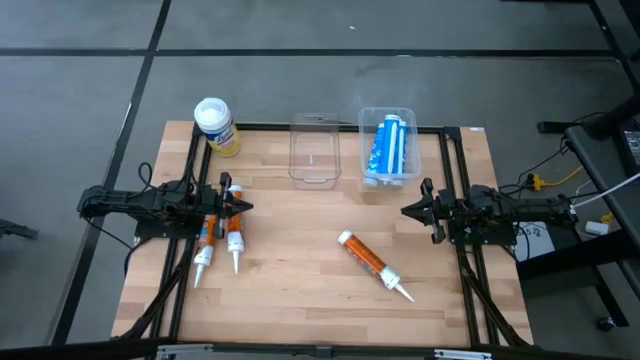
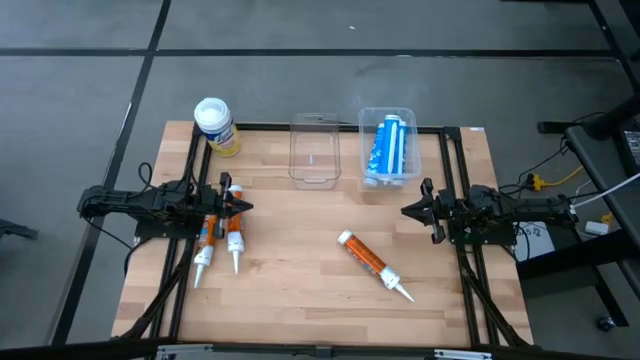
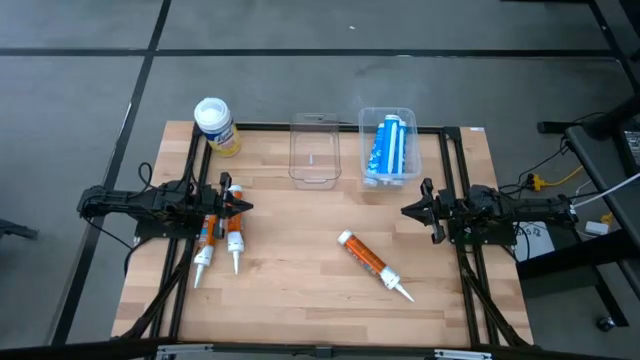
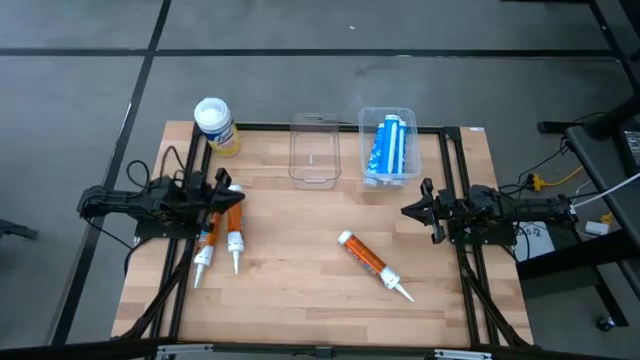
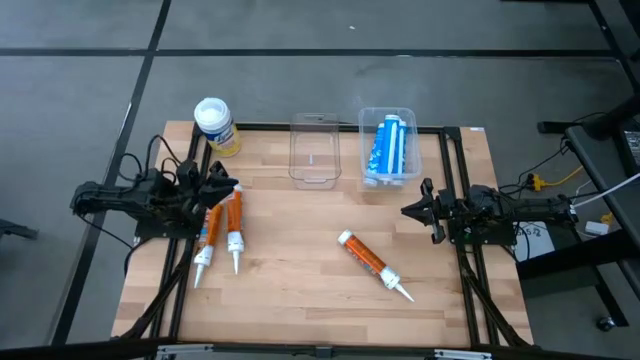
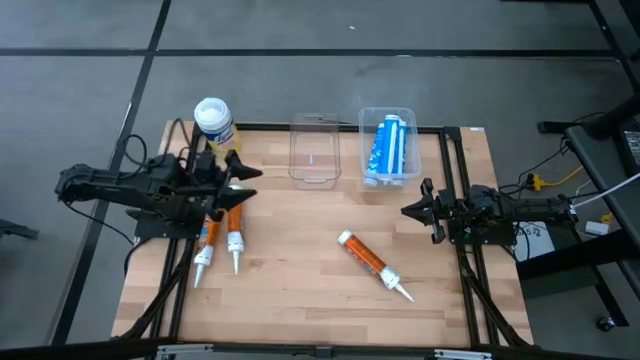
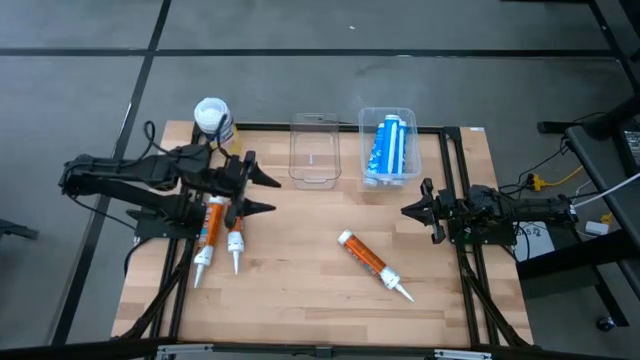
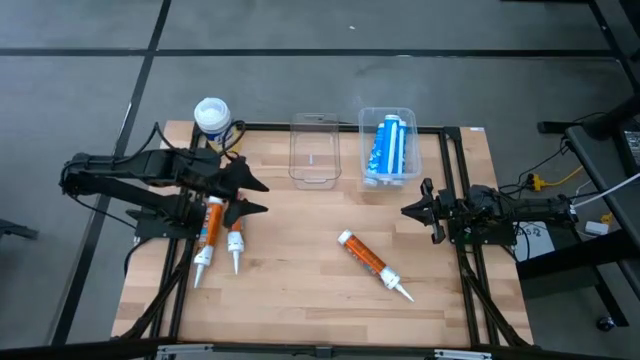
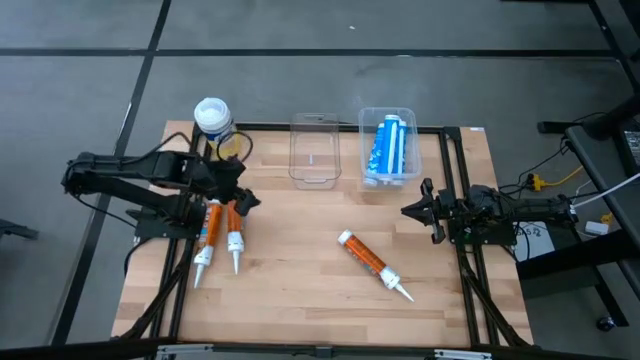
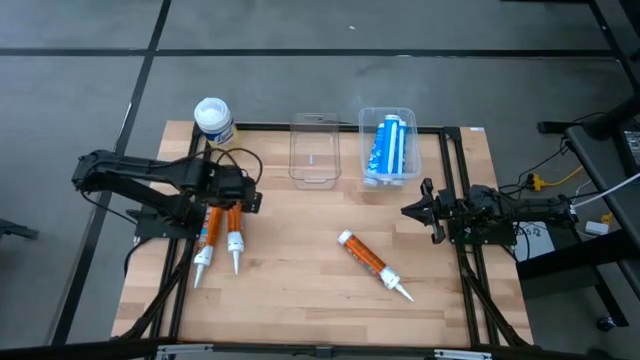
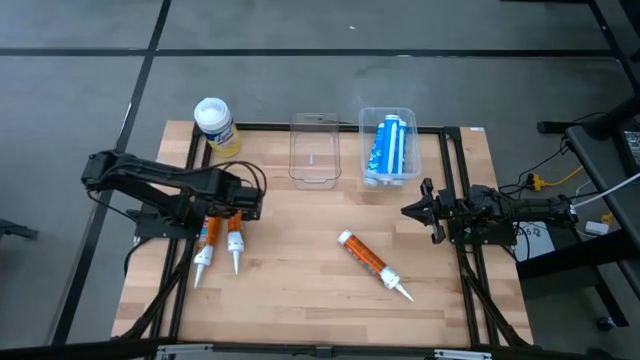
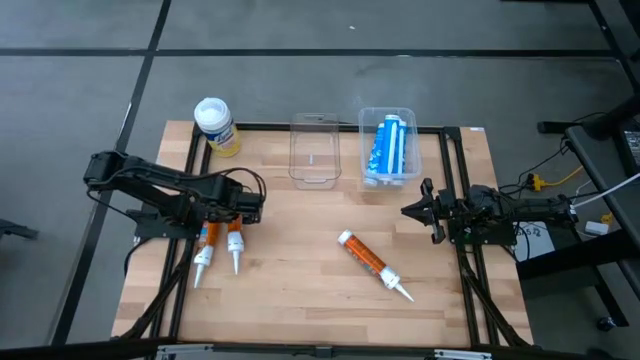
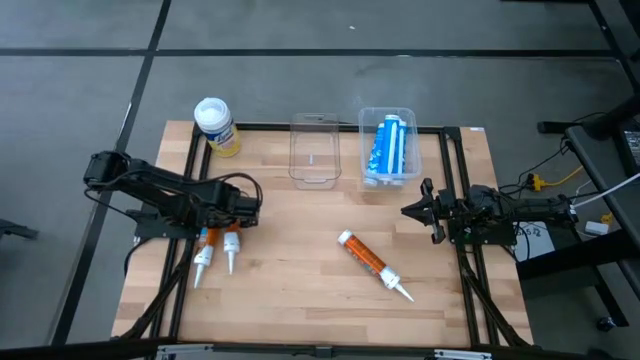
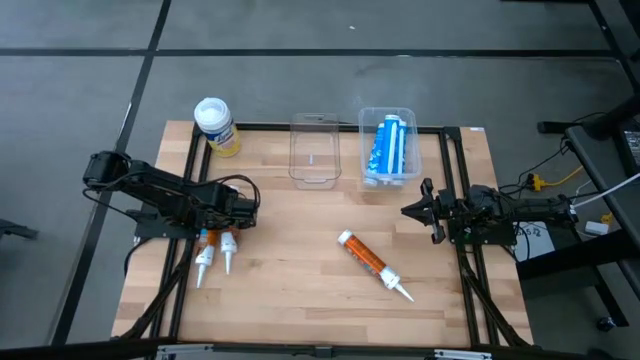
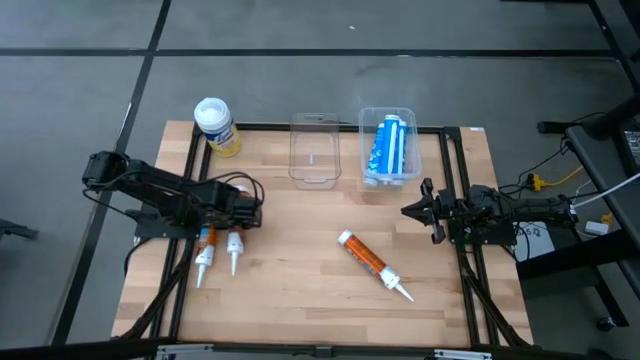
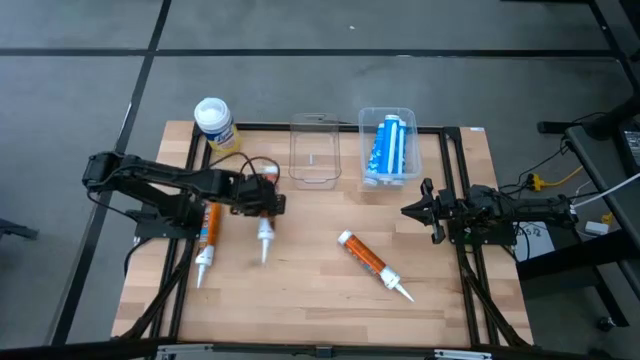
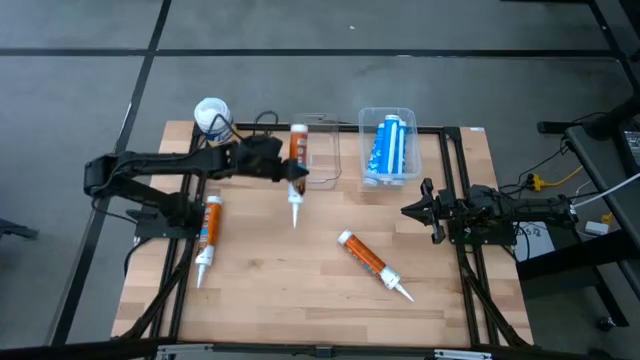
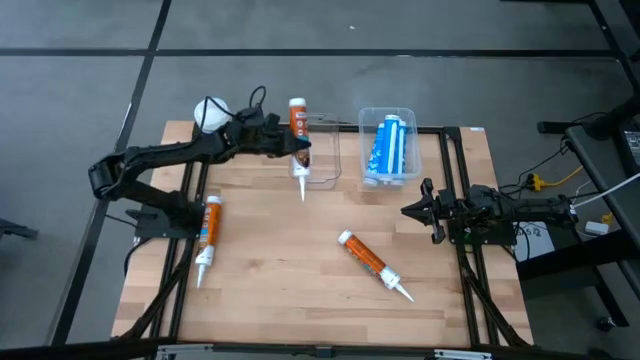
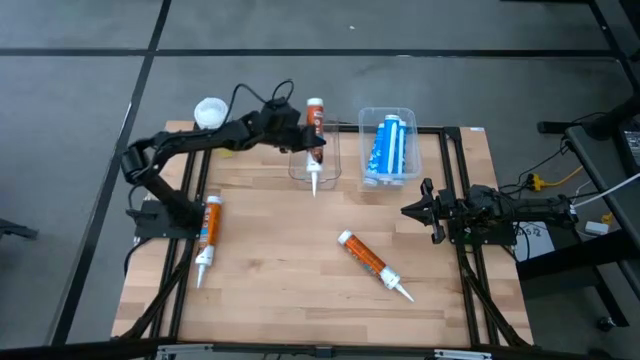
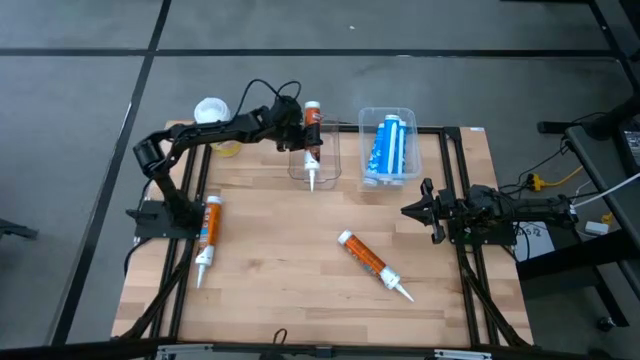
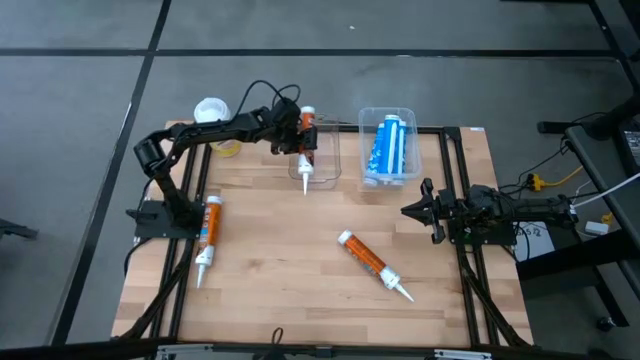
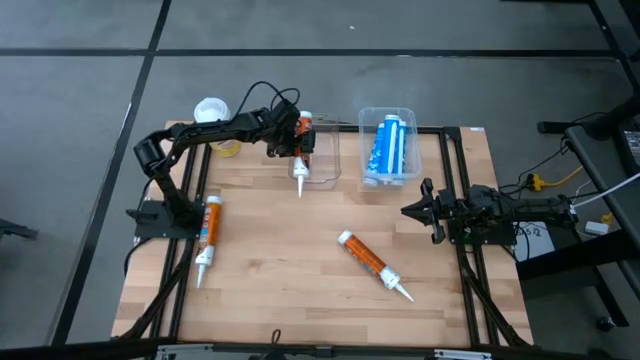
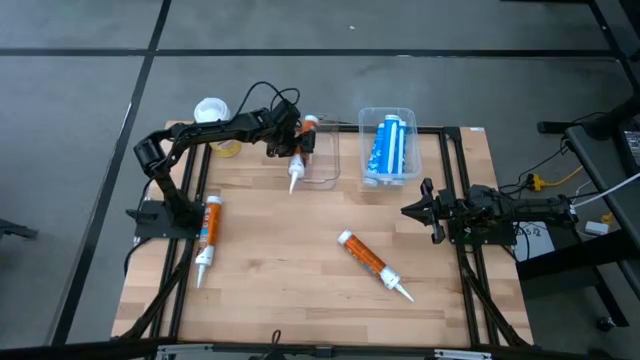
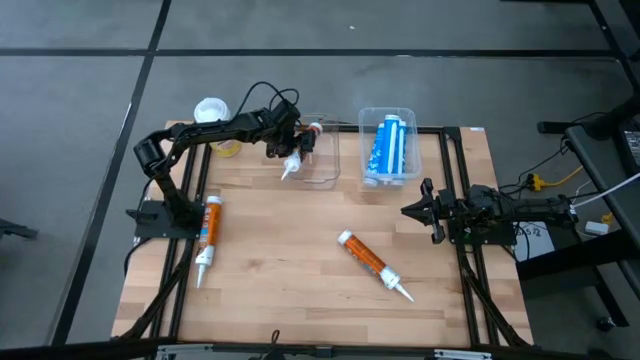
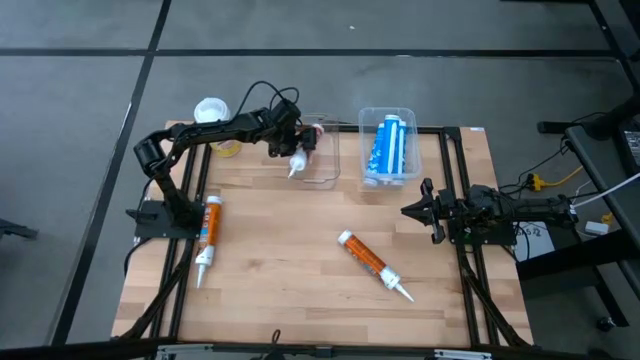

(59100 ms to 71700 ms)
Task: Pick & place silicon tubes, Sealant and Lysol wipes
Put the middle orange sealant into the left transparent bin

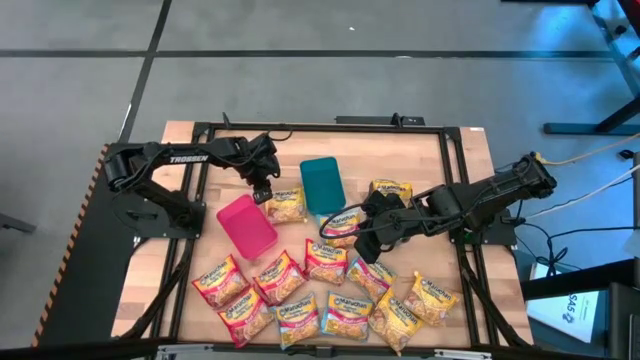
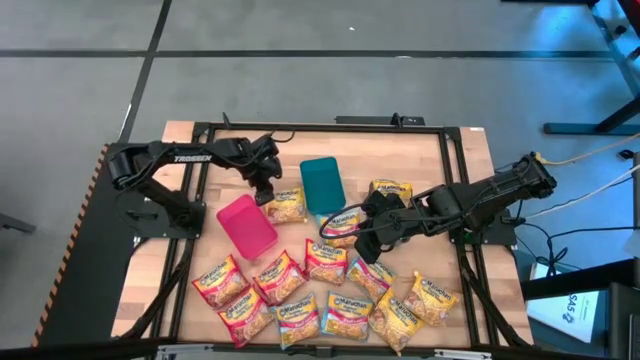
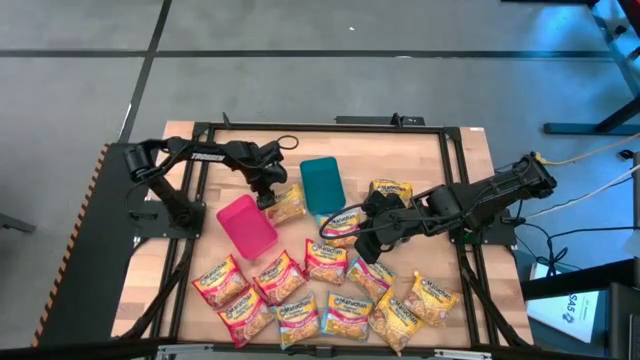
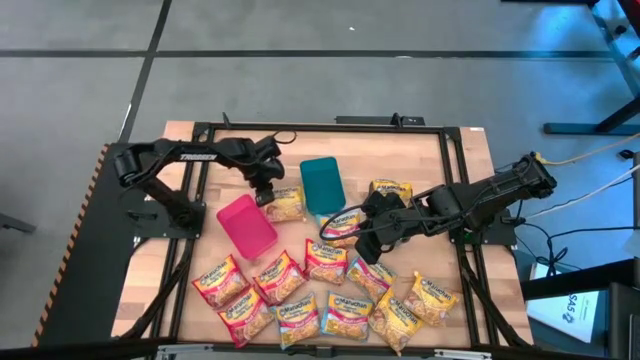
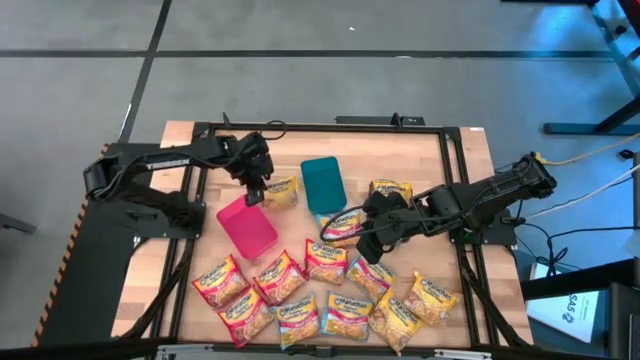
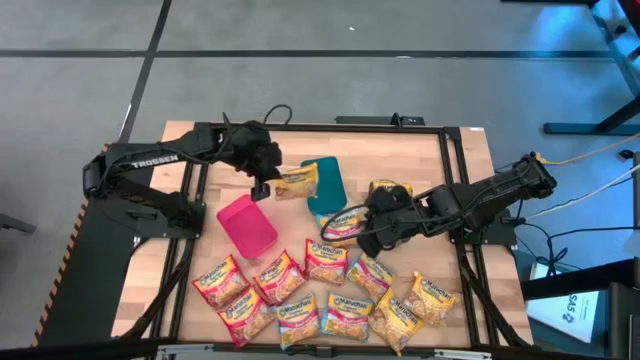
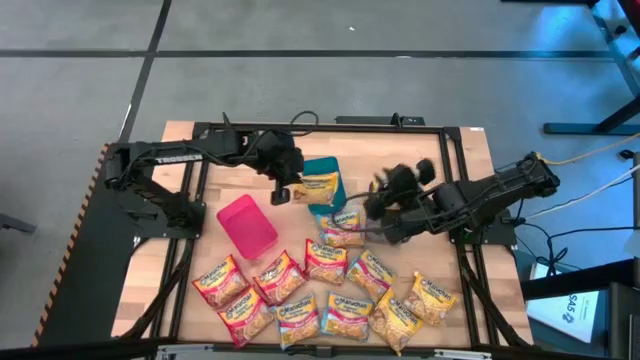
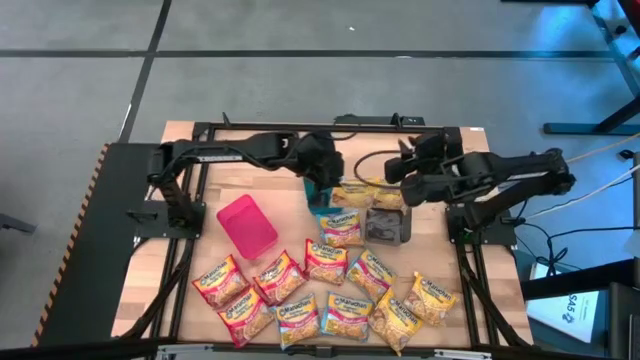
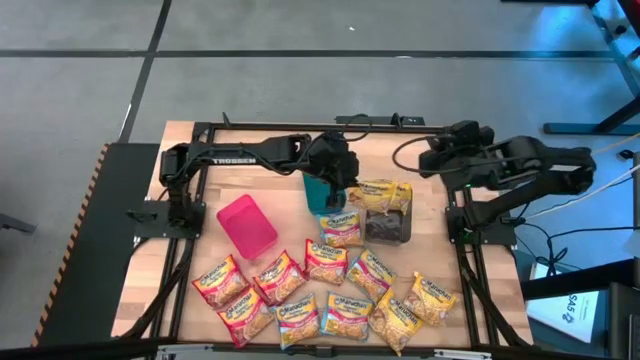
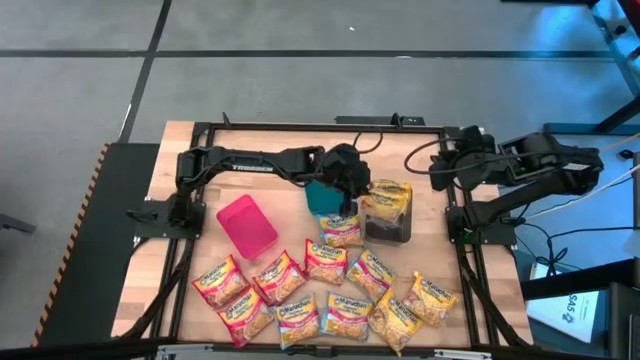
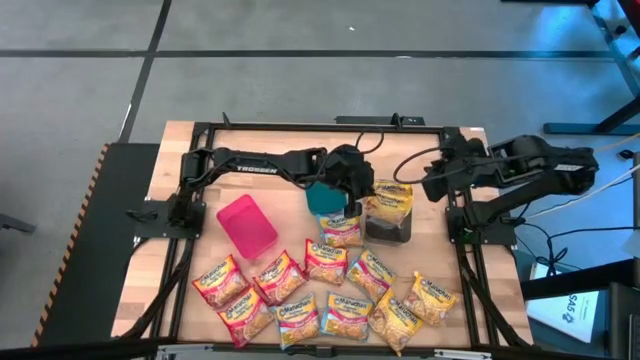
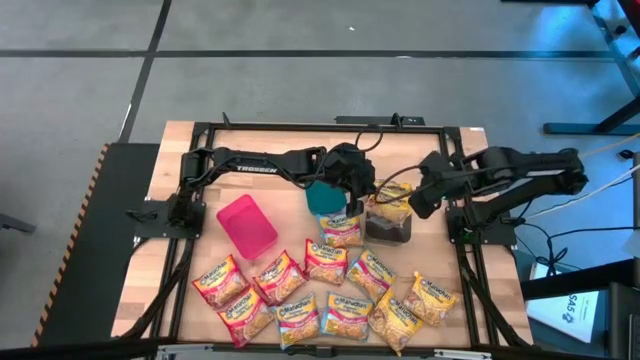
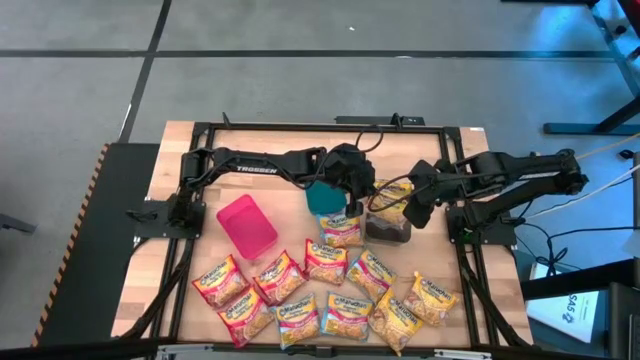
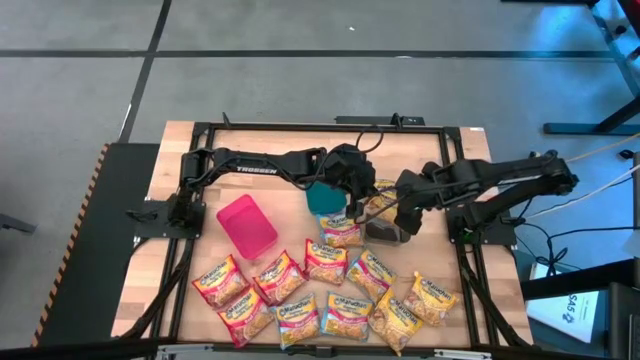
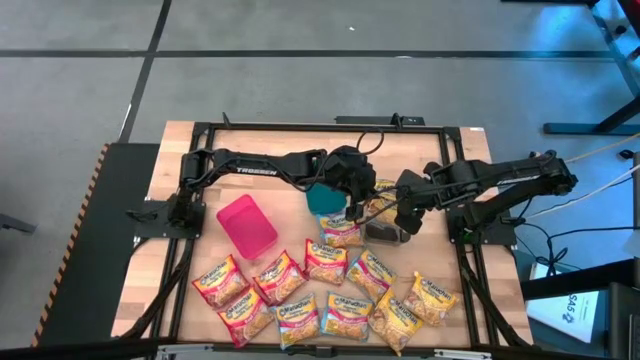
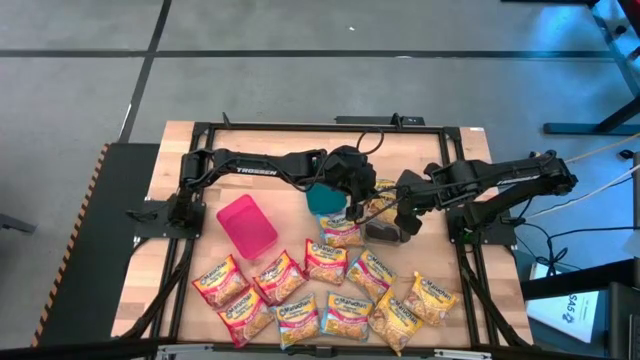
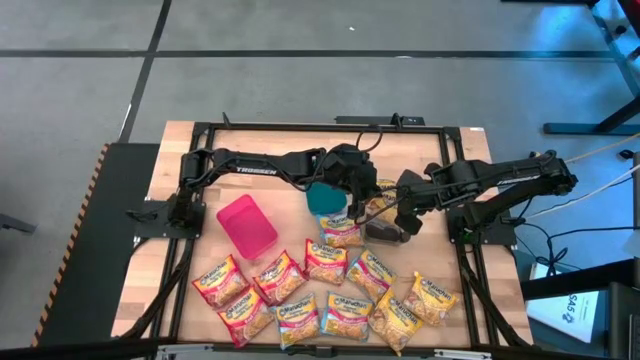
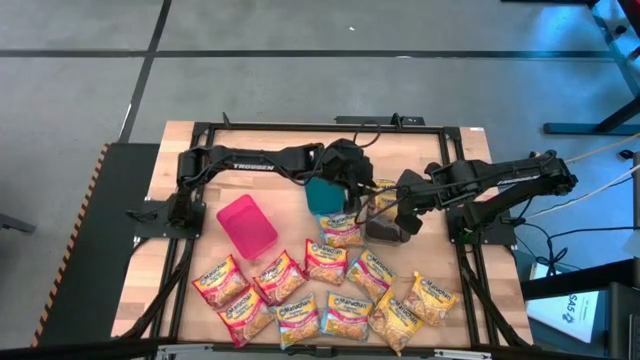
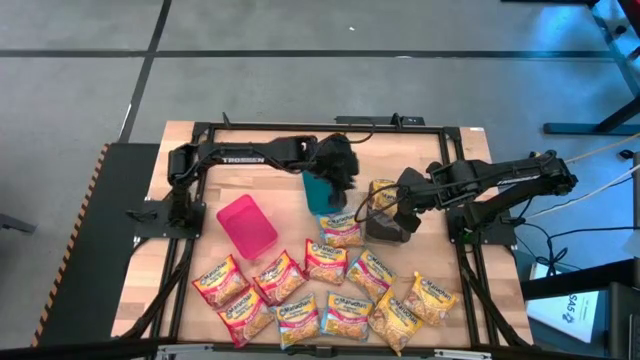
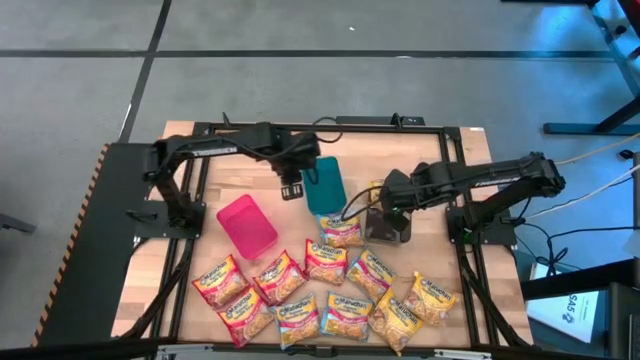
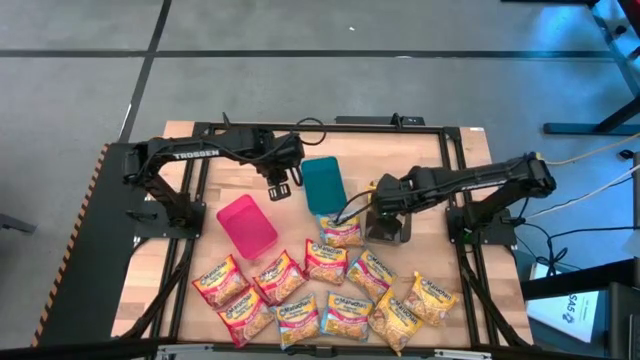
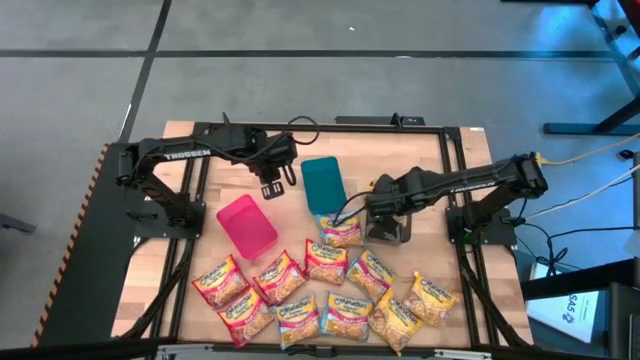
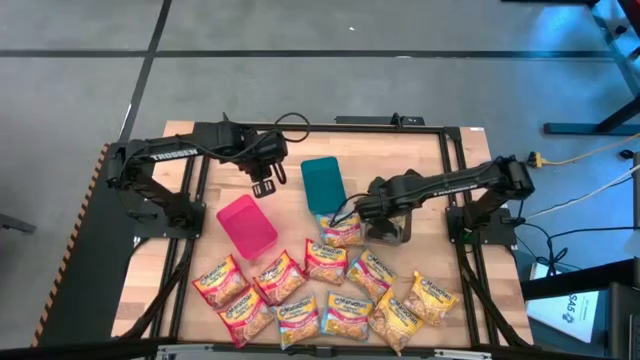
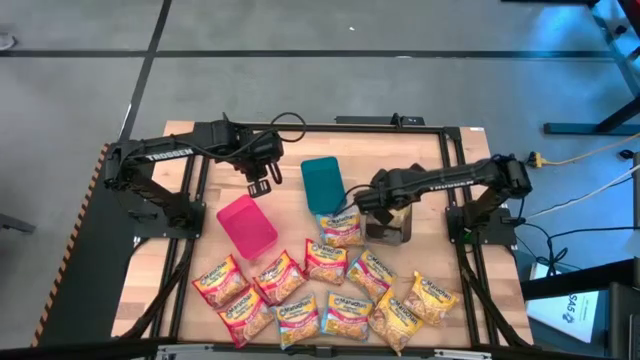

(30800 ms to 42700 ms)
Task: Sort Maruchan noodles
Put the yellow noodle pack into the black bin
